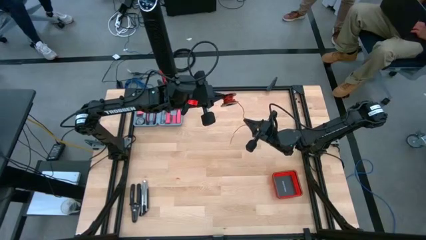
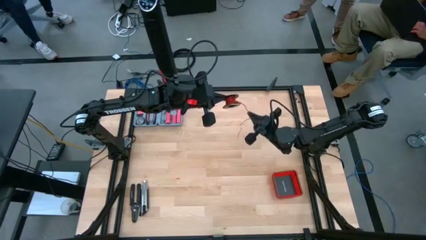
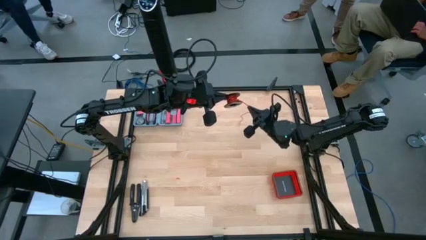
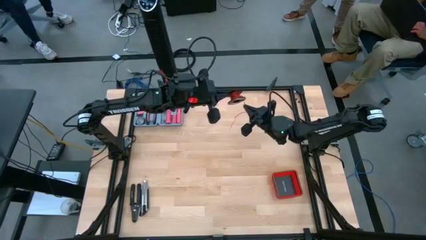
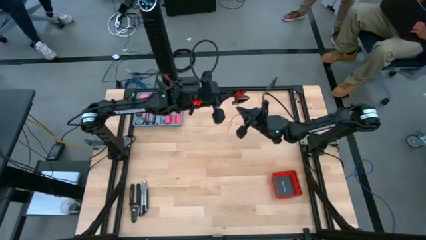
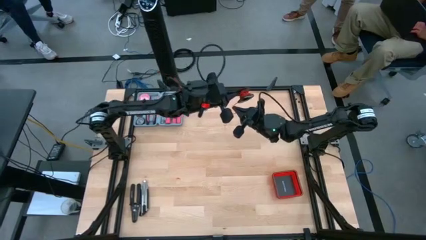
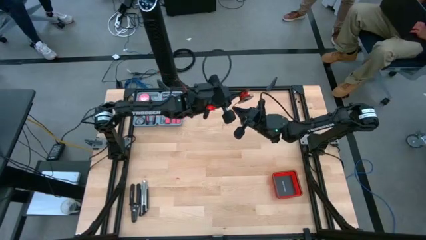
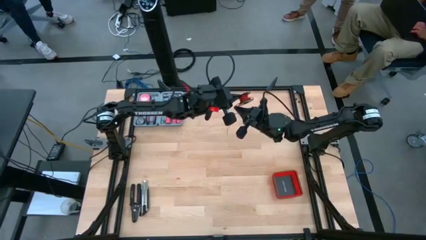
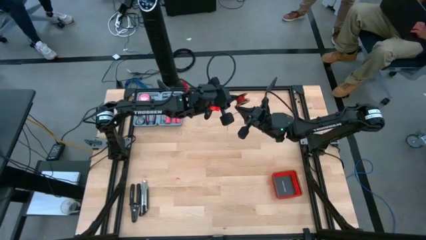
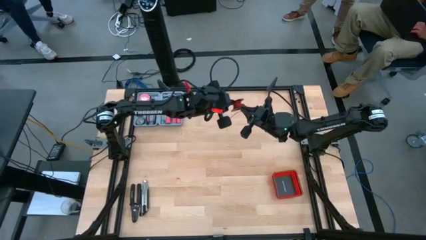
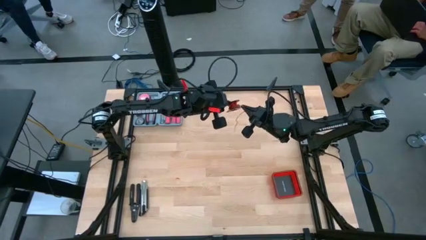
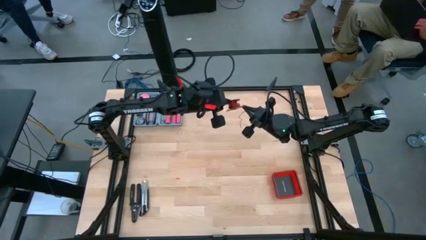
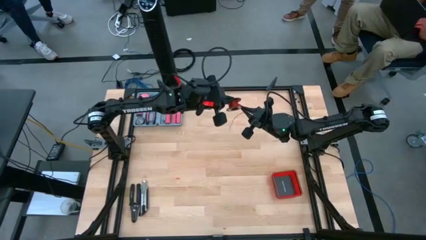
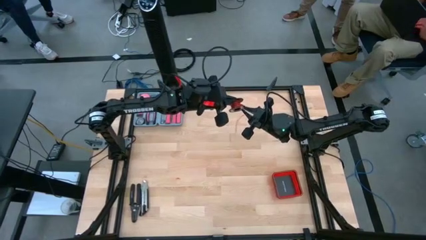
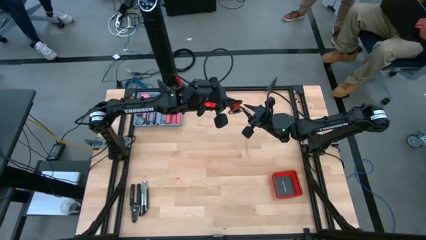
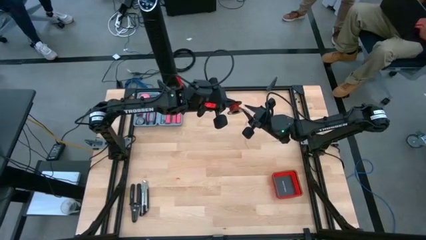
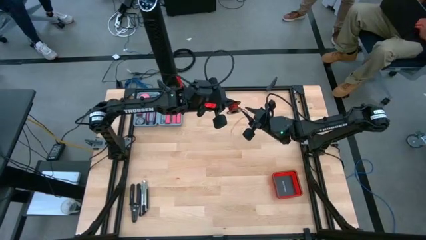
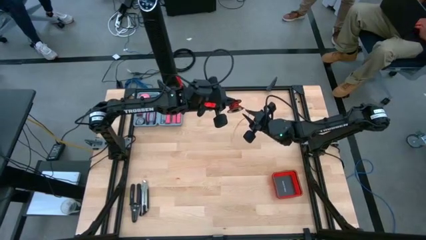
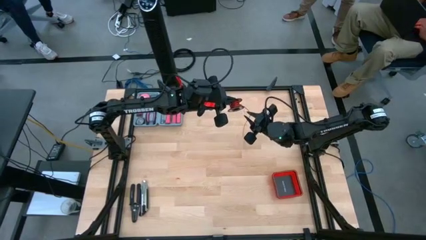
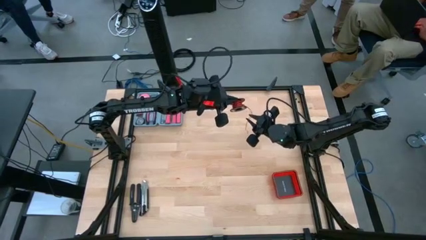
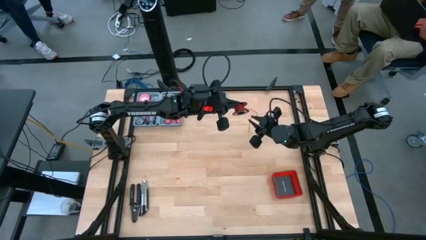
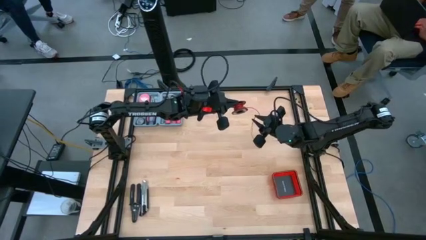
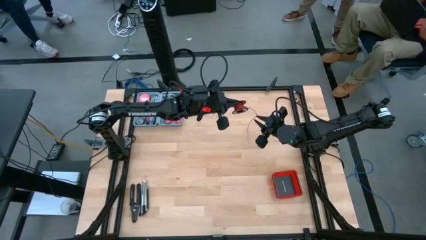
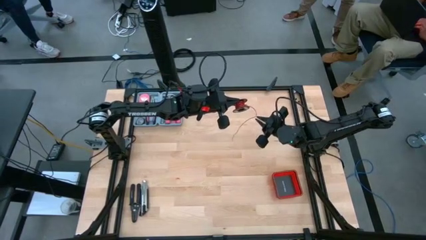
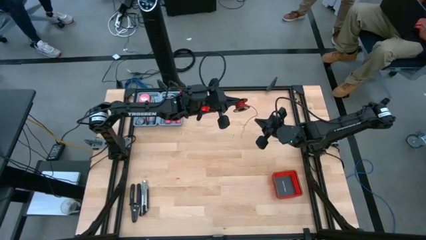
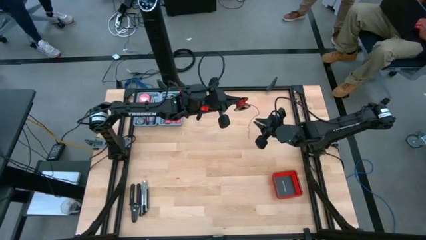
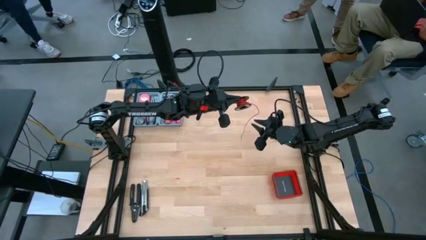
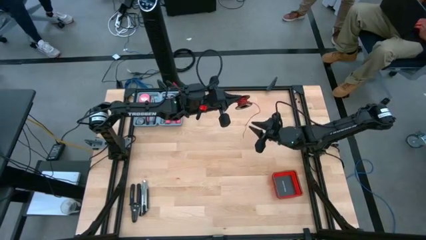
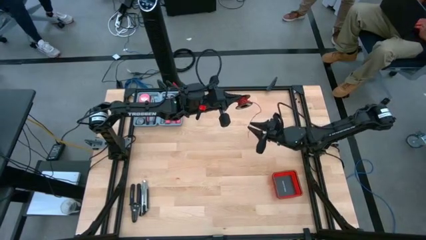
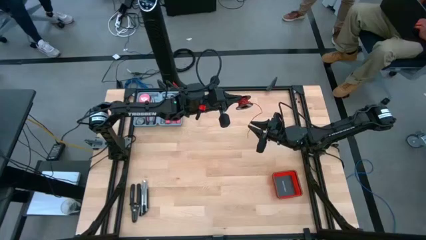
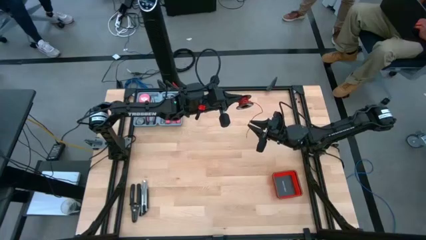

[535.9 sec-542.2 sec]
Task: Coil cords
Coil the red wire onto the spool

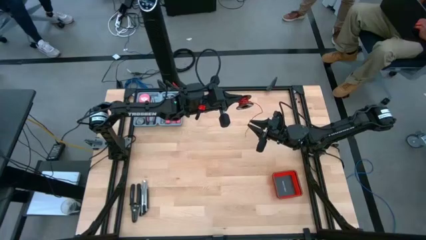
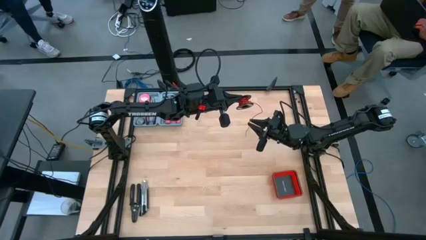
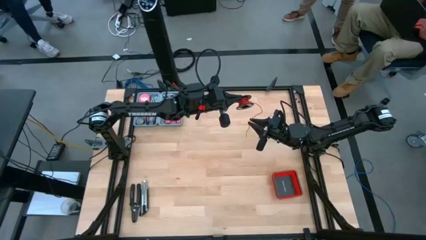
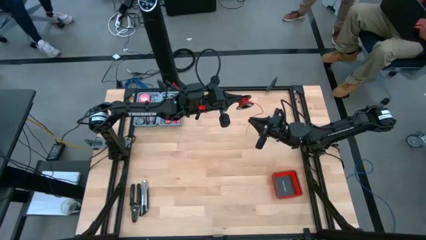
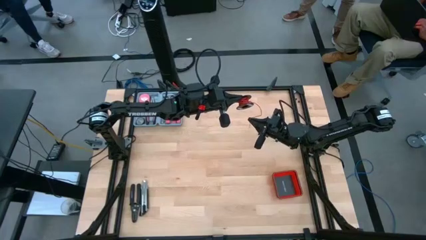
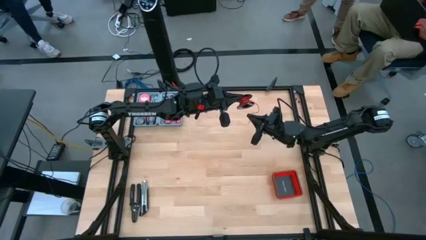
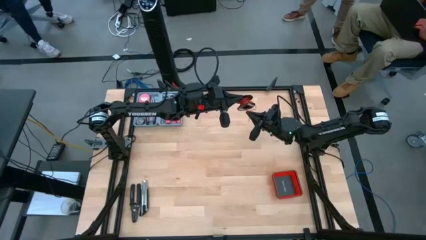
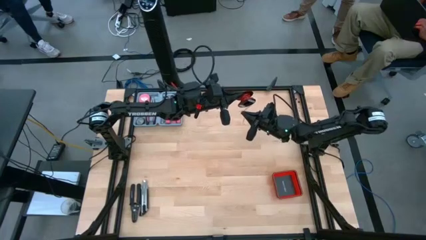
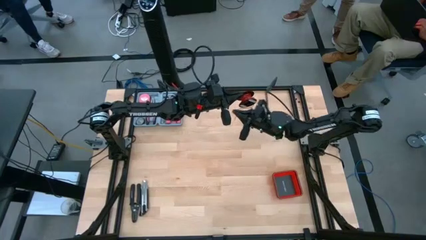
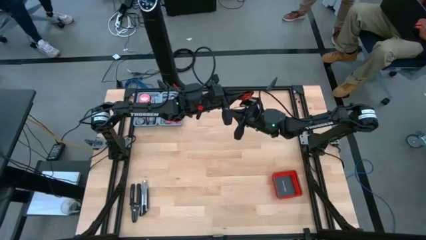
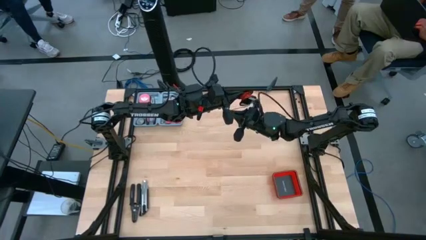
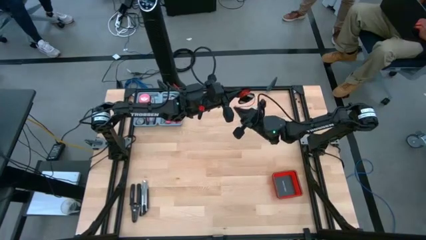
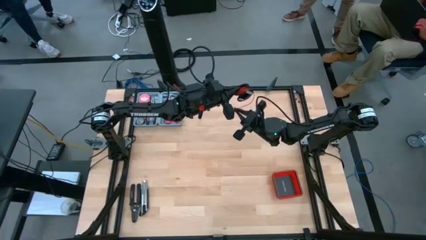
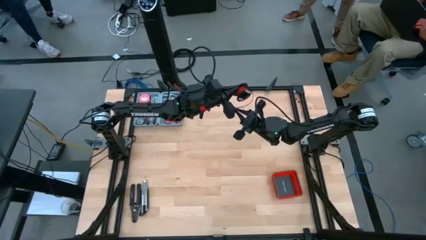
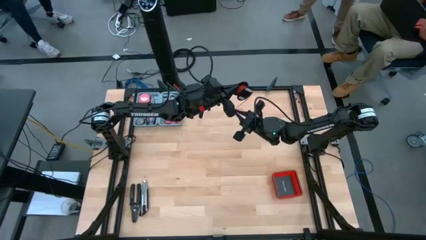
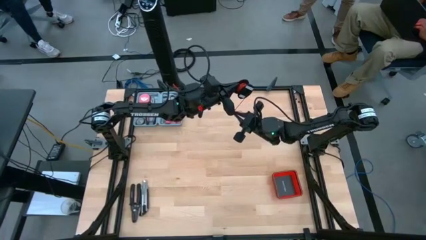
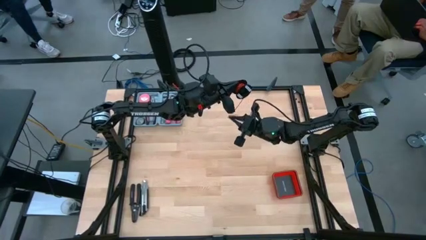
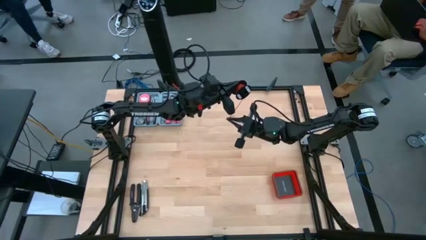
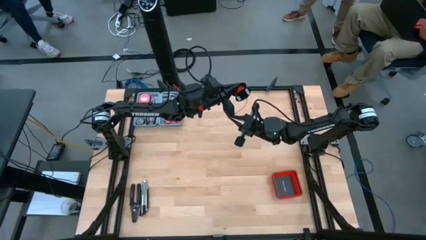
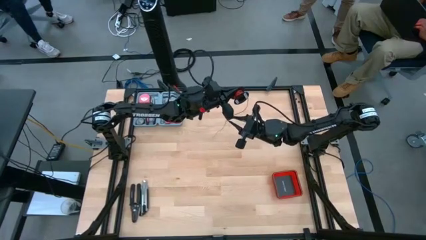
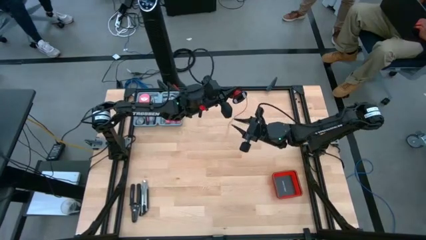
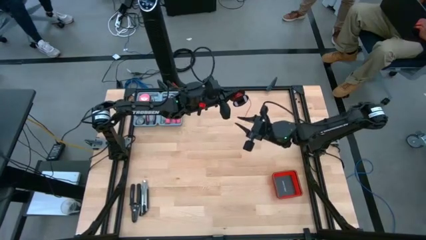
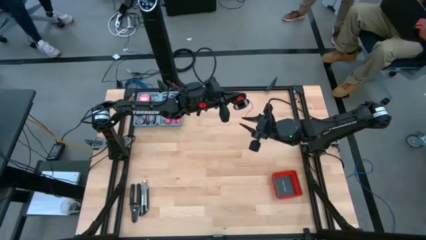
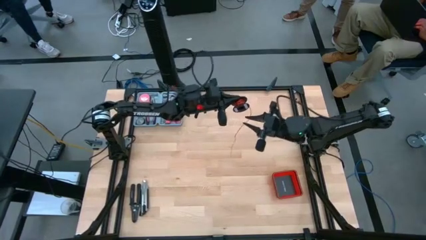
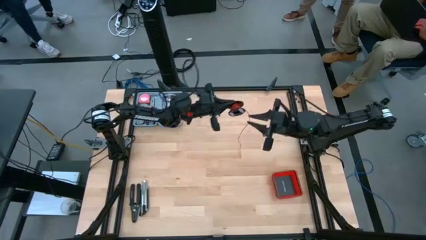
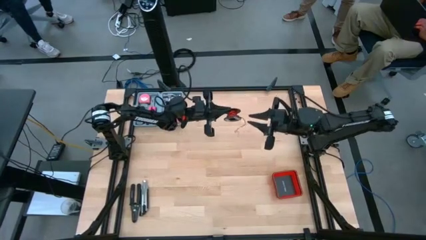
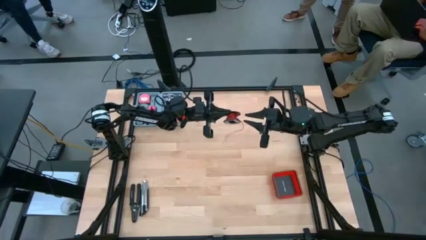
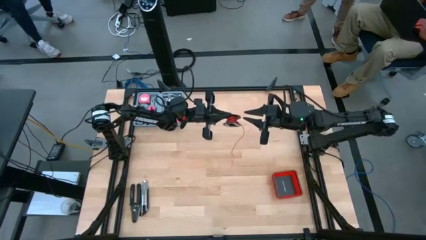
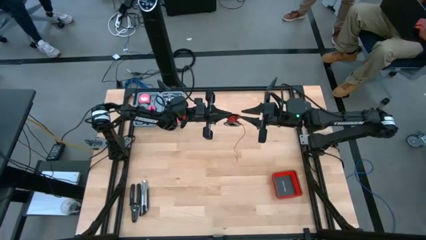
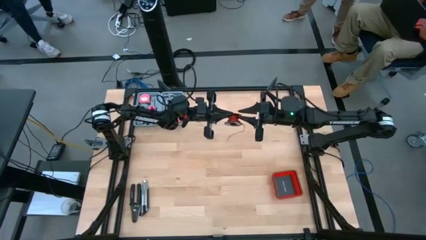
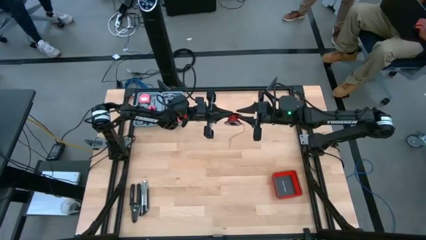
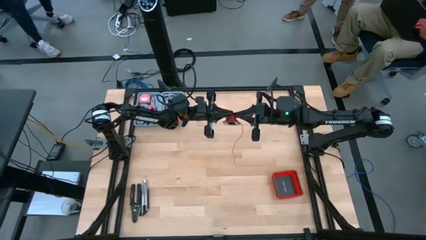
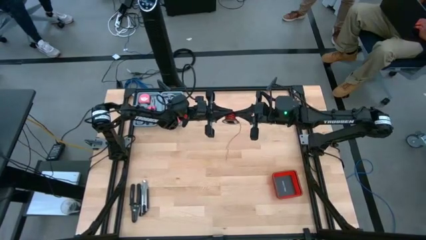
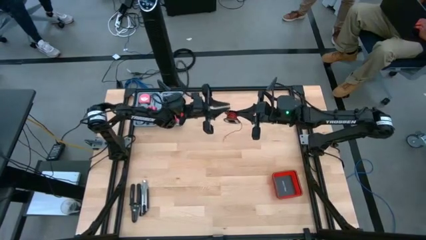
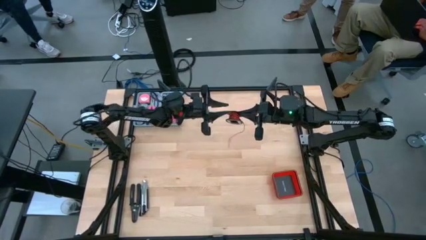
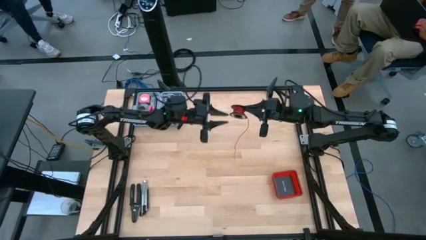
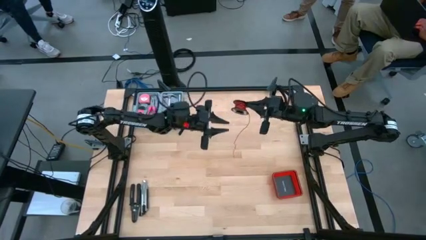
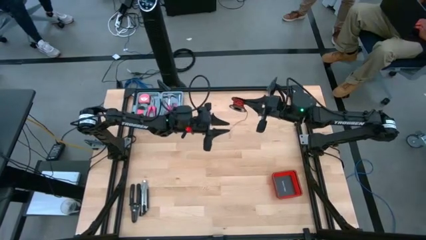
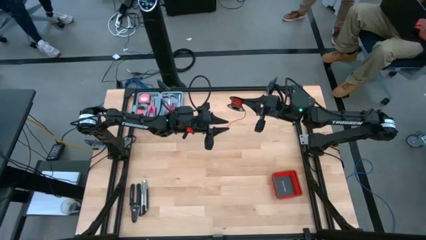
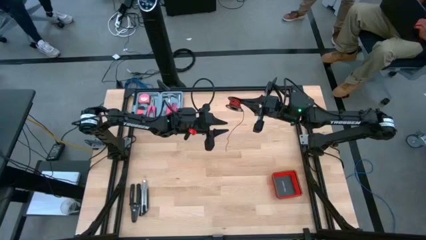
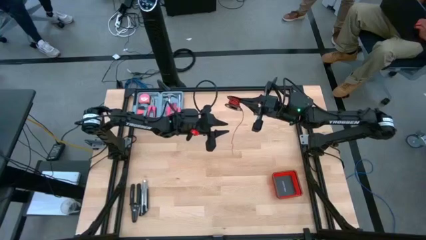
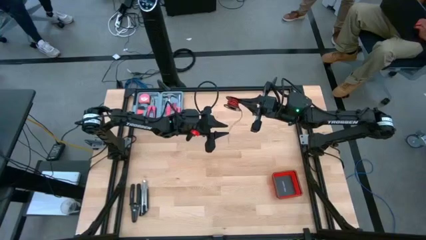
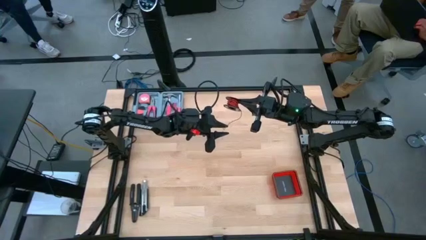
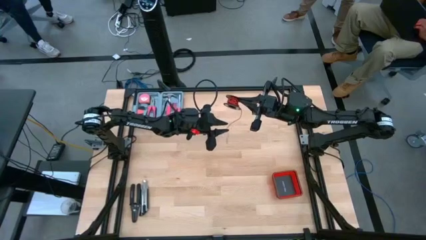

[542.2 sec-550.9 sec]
Coil the red wire onto the spool

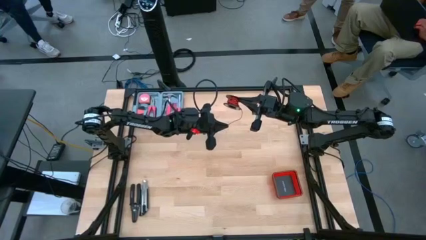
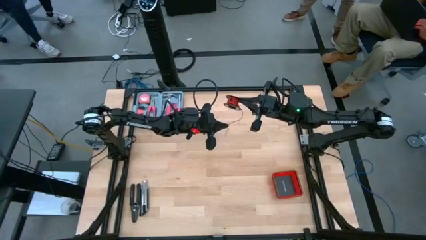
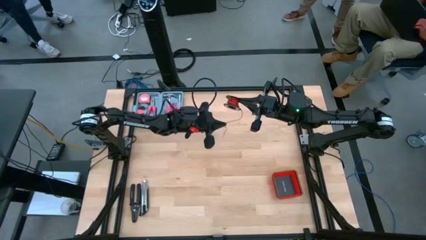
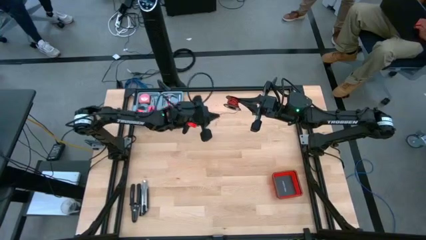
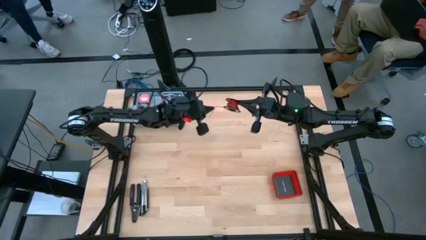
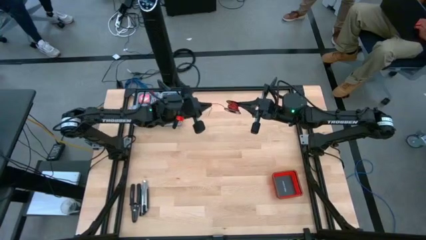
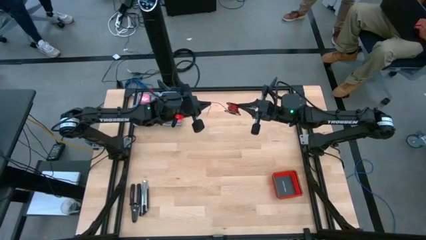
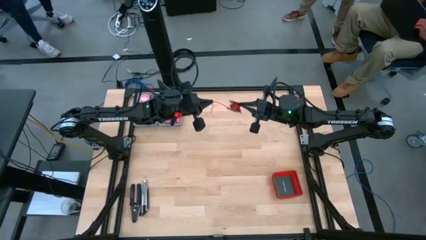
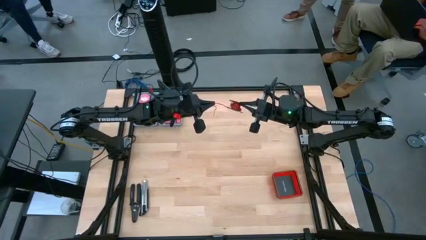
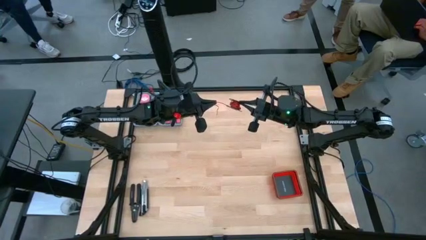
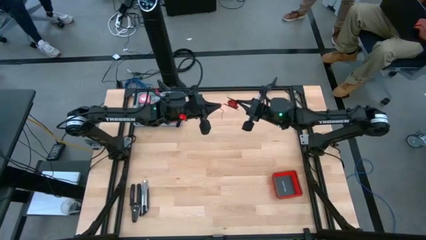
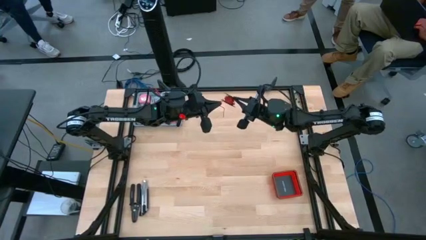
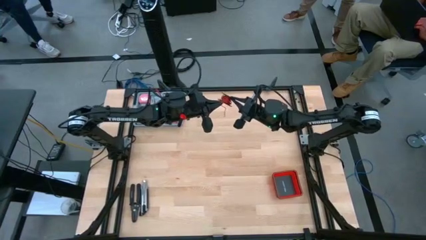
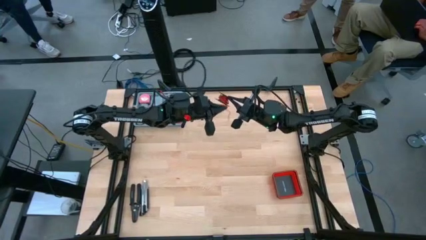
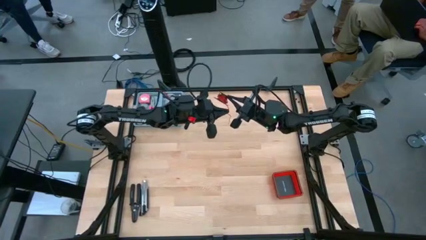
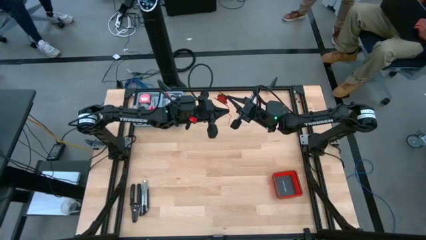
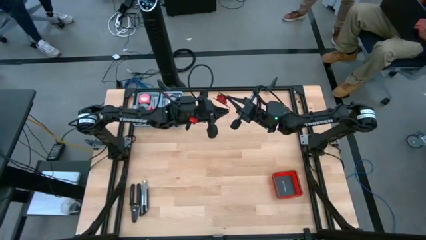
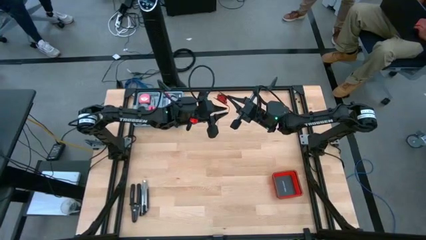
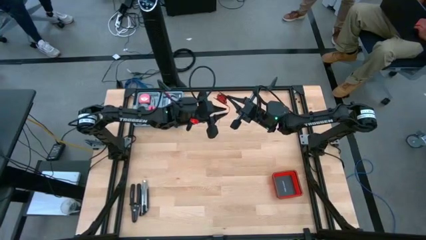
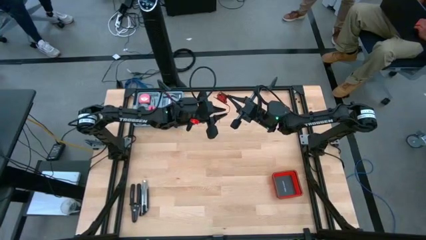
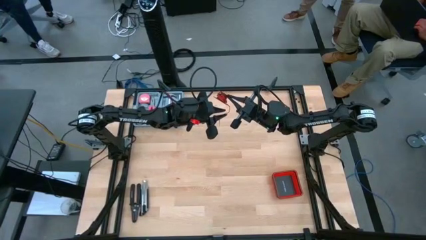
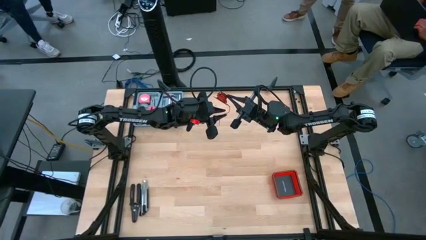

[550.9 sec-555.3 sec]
Coil the red wire onto the spool
